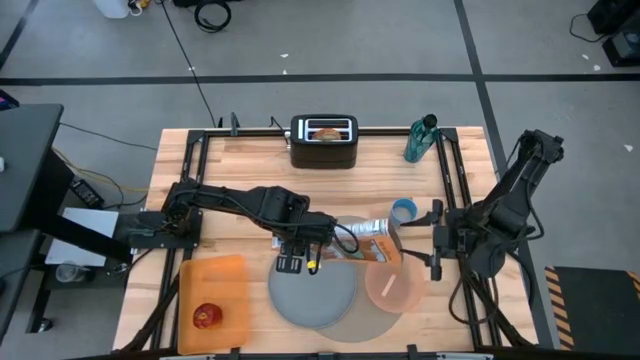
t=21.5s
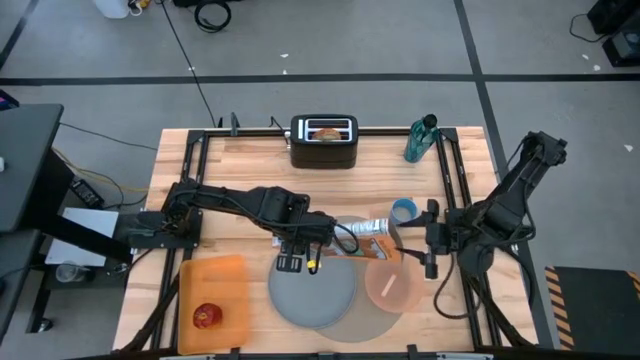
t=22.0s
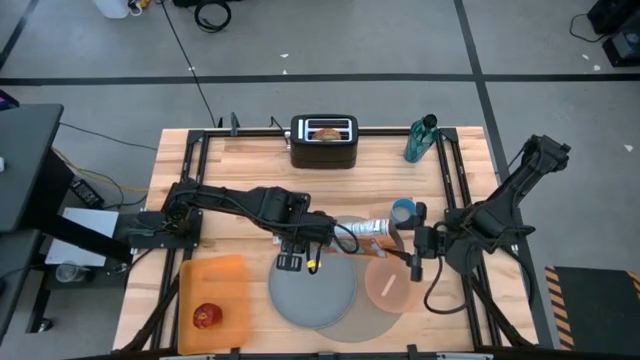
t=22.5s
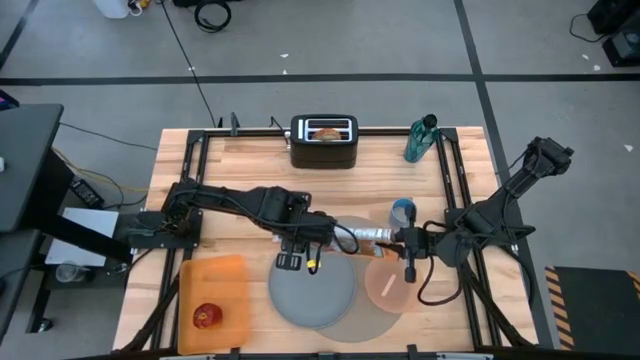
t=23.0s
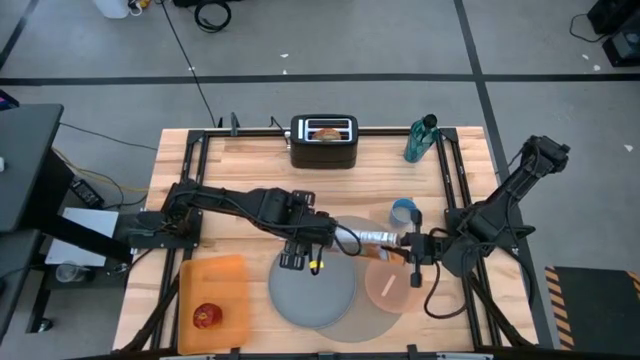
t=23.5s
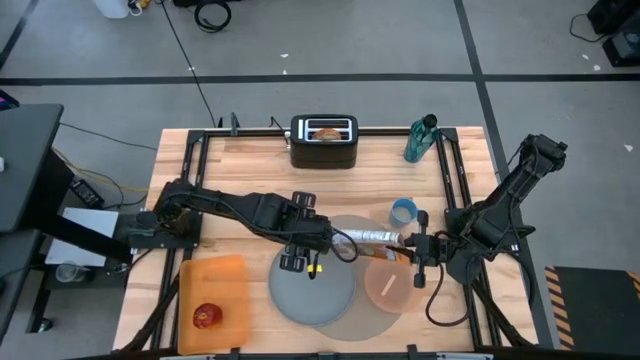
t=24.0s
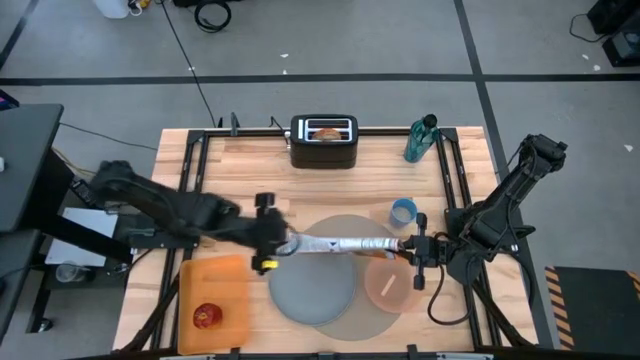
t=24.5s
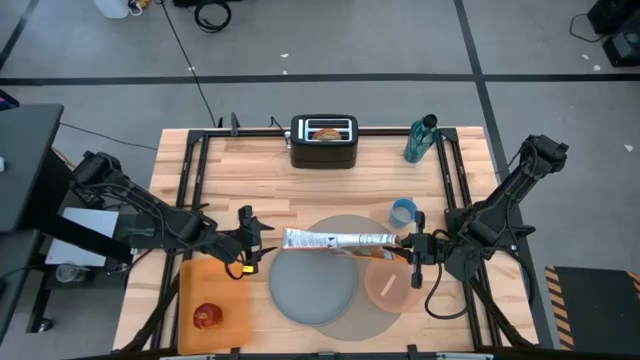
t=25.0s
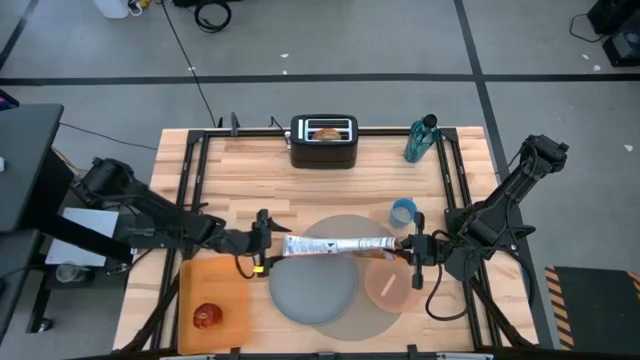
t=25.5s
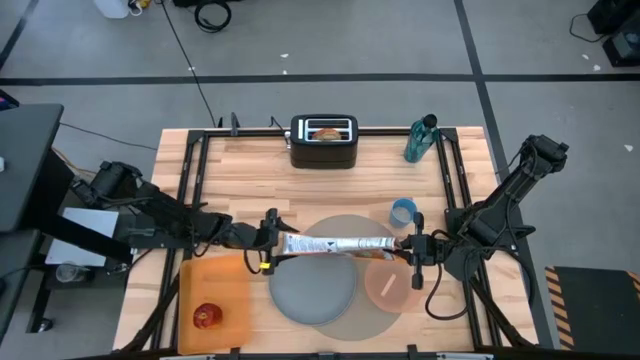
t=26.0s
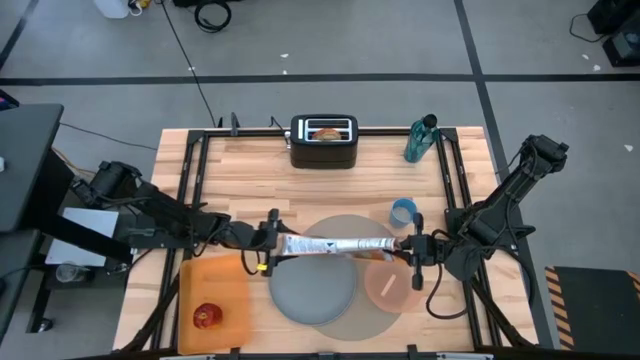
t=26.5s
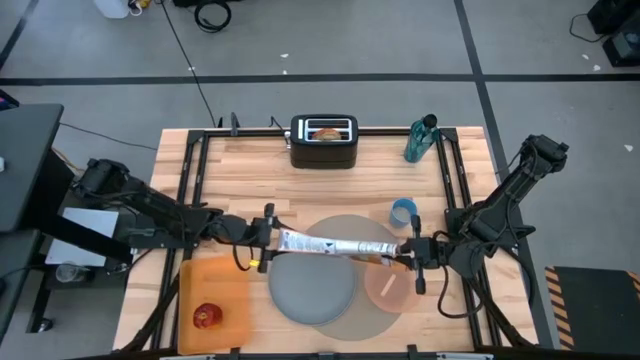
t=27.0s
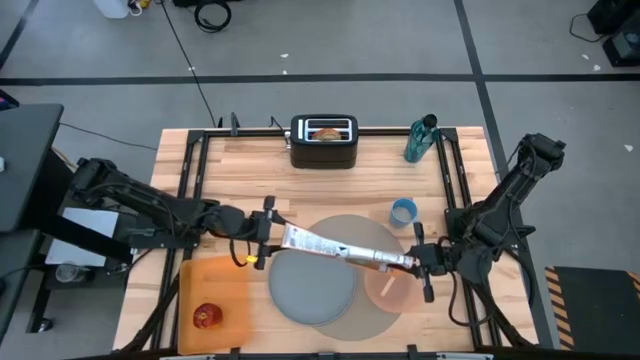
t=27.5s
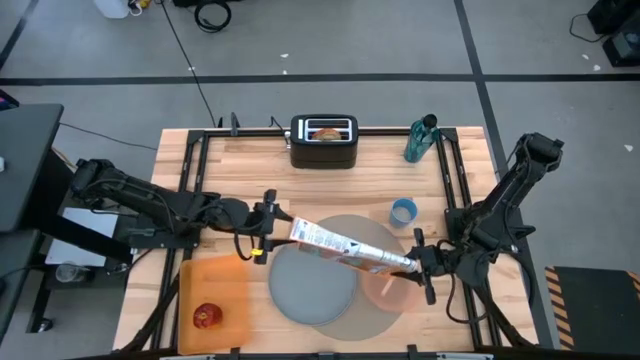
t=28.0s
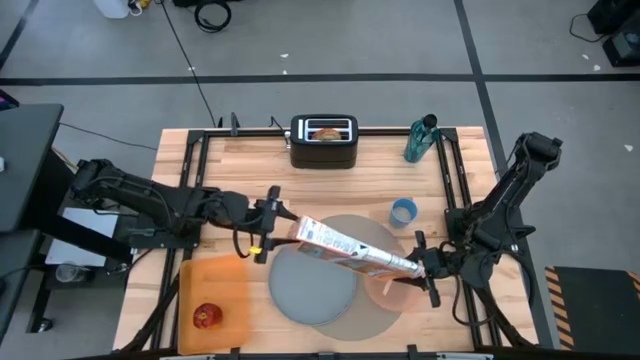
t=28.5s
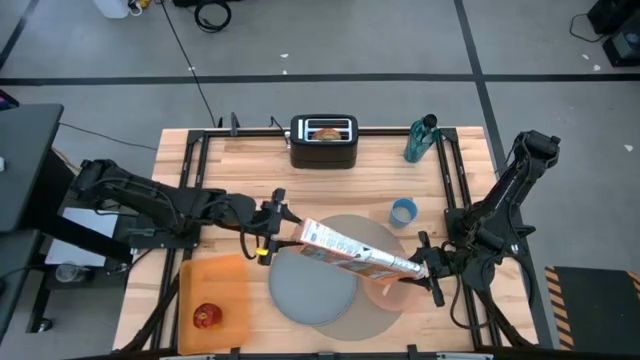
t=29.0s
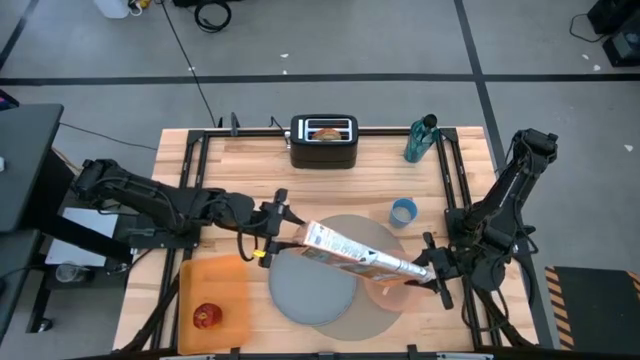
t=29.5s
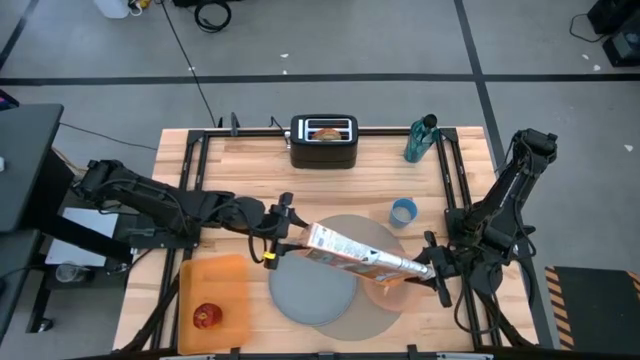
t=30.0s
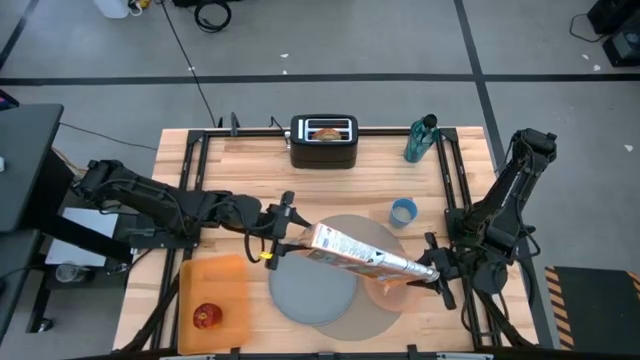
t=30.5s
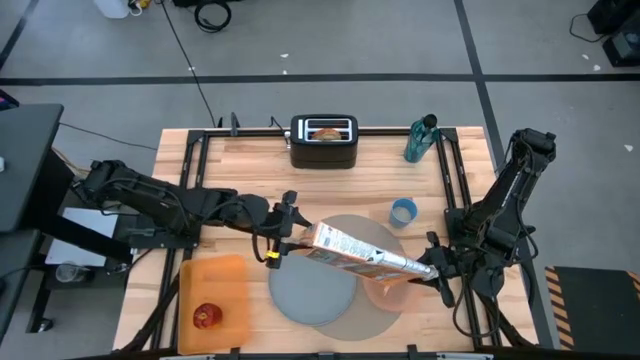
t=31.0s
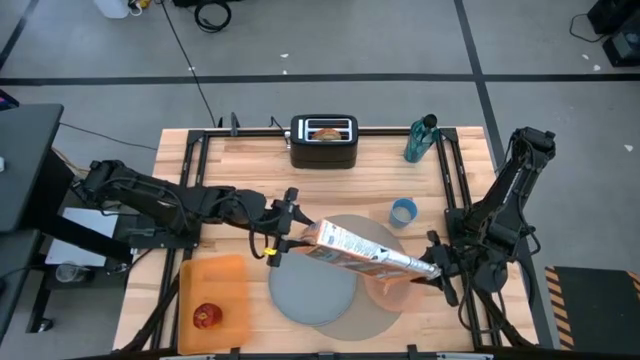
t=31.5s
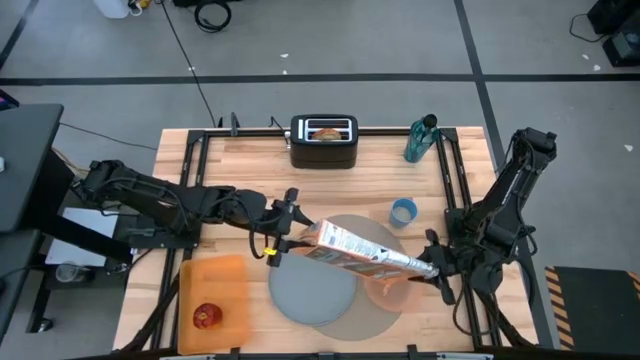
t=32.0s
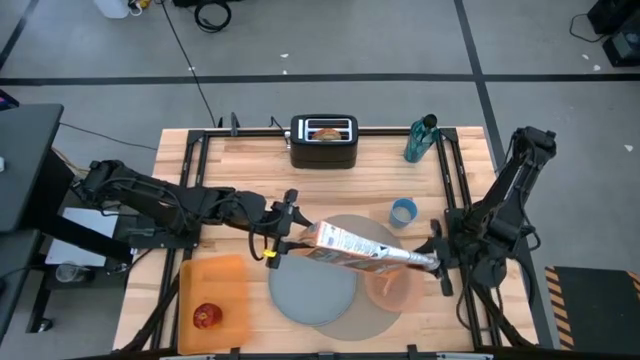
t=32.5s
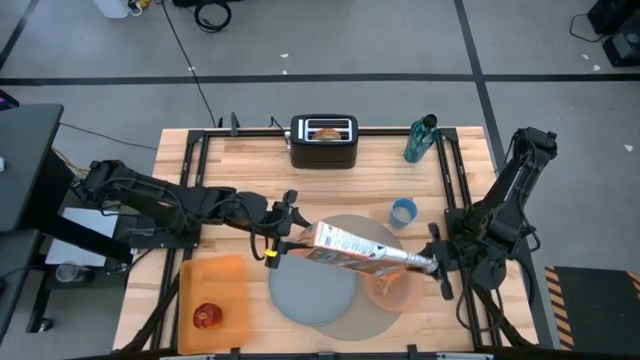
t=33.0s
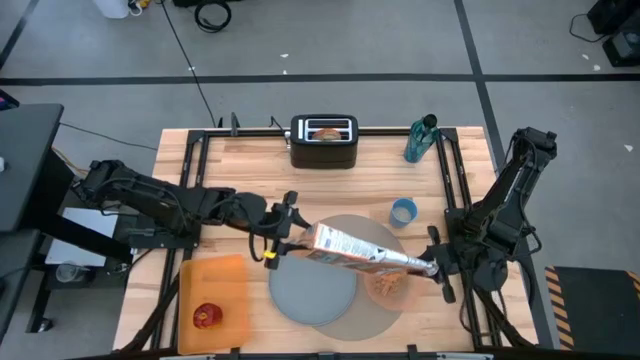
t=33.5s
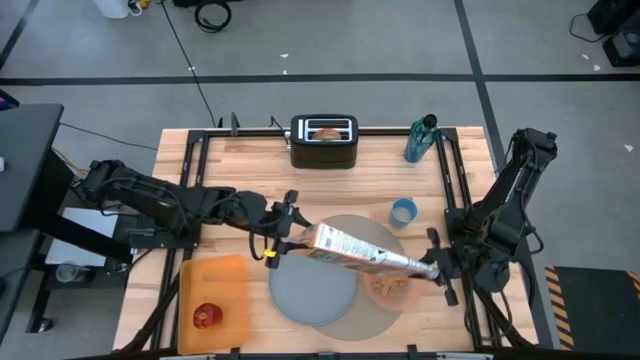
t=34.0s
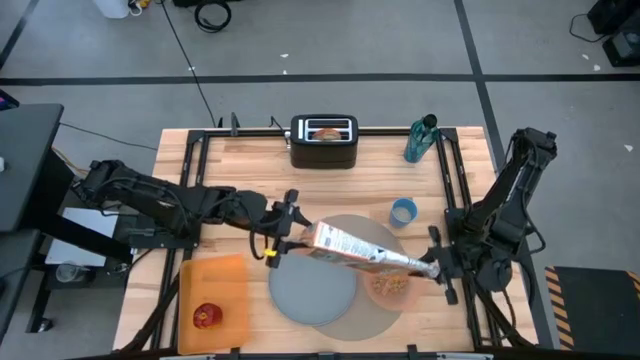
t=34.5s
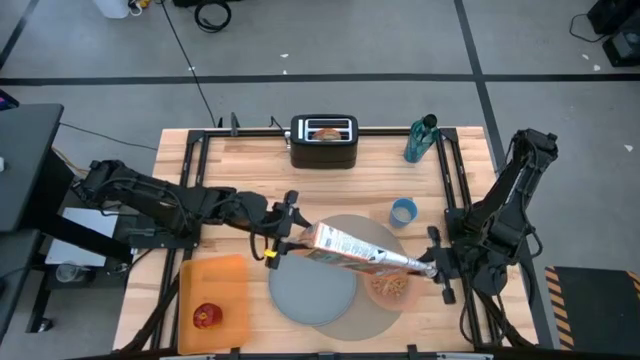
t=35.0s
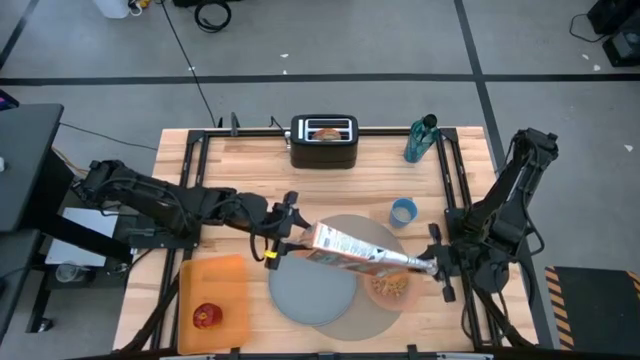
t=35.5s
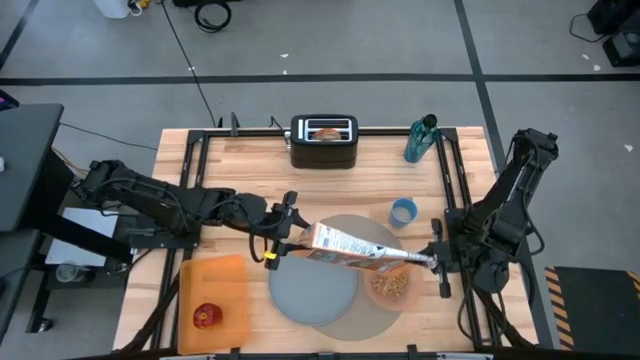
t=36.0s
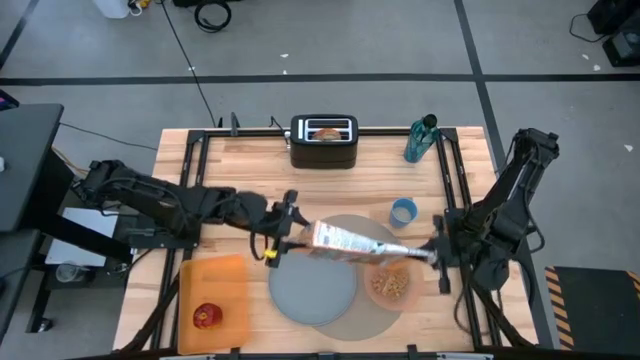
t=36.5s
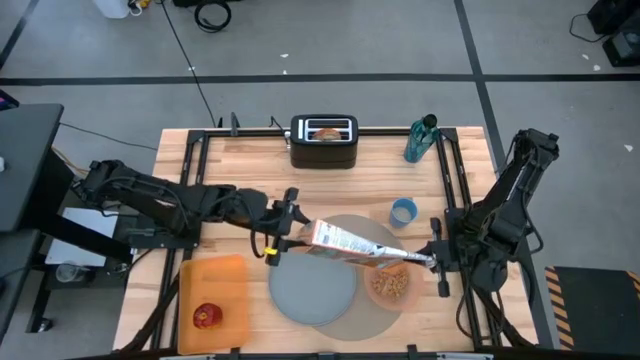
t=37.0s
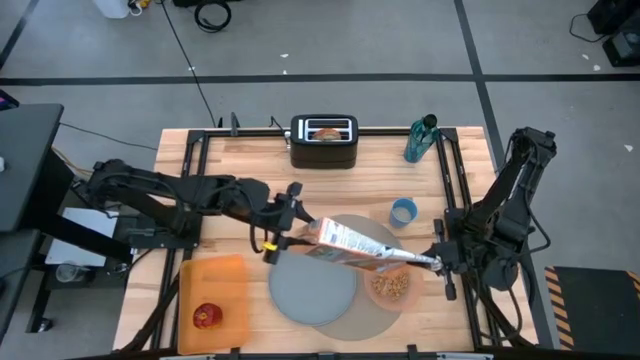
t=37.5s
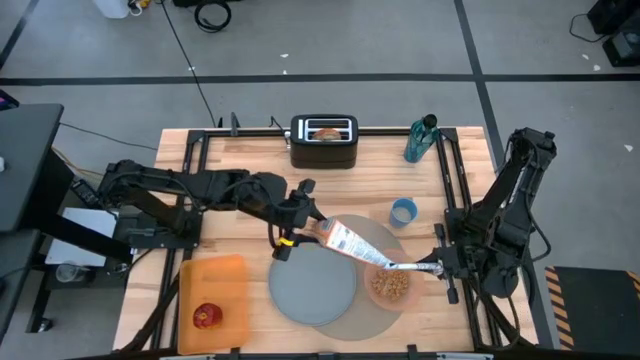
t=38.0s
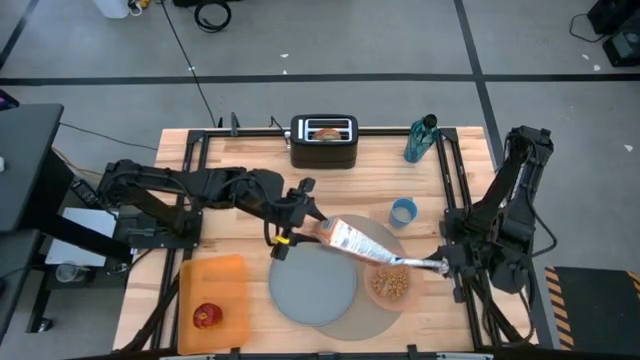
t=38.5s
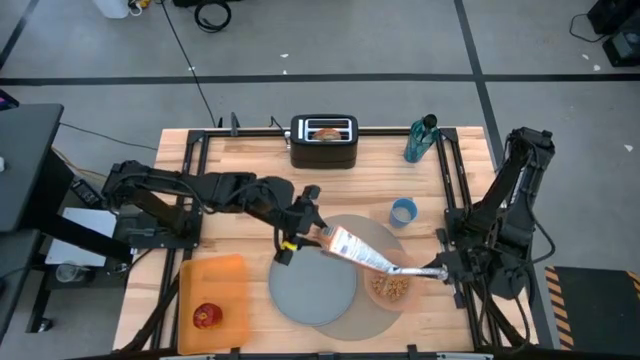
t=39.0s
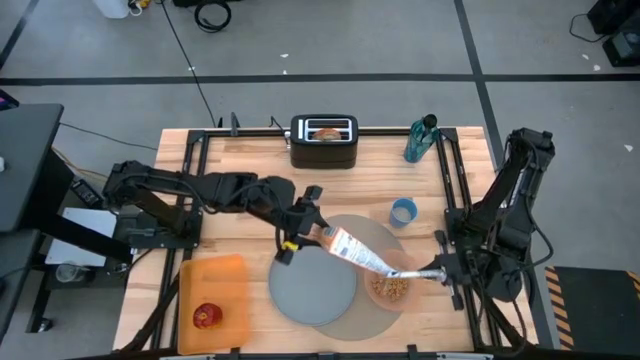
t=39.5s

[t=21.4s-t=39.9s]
Task: Arrange a breakfast setting
Pour cereal into the orange bowl

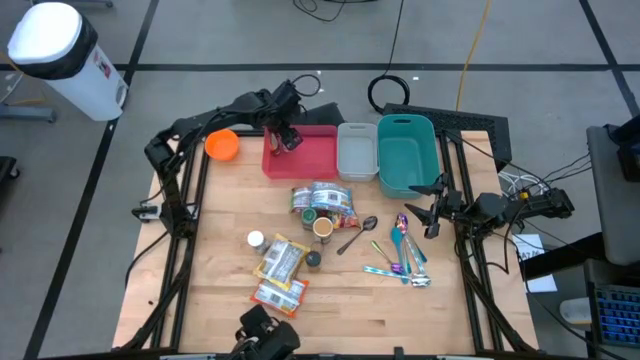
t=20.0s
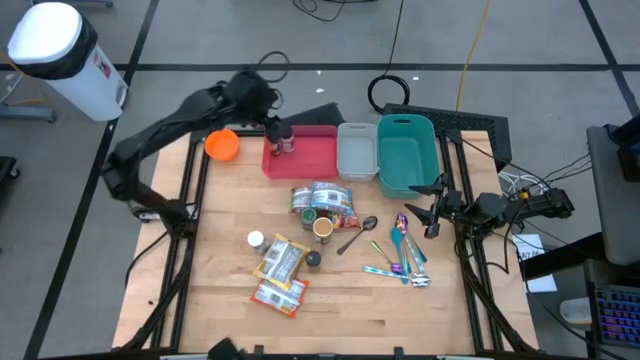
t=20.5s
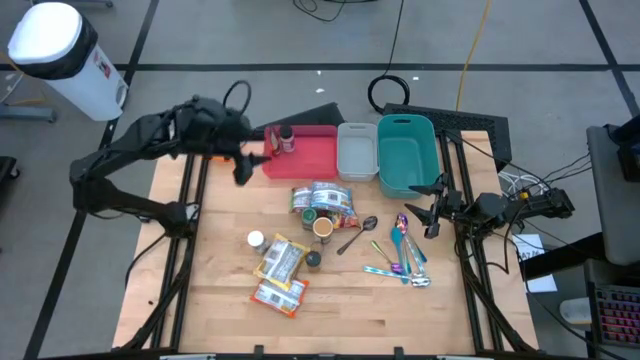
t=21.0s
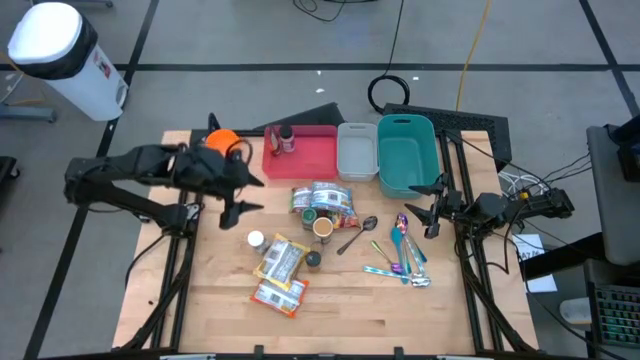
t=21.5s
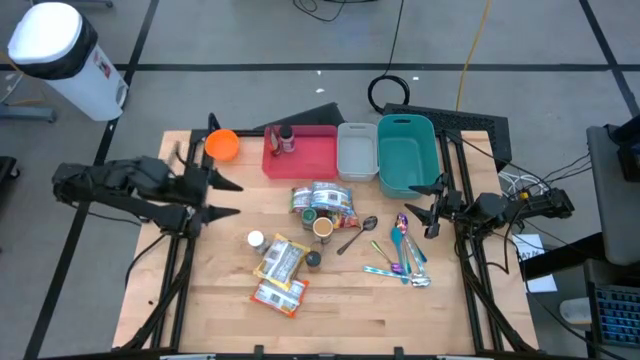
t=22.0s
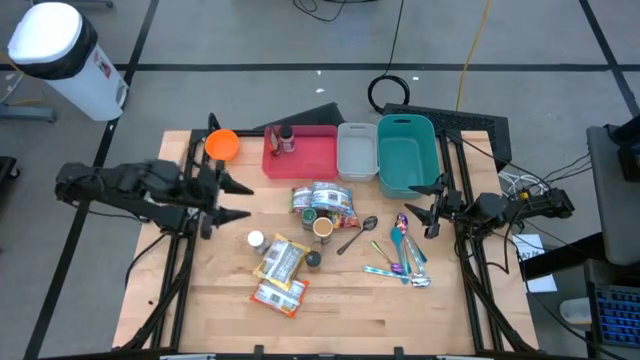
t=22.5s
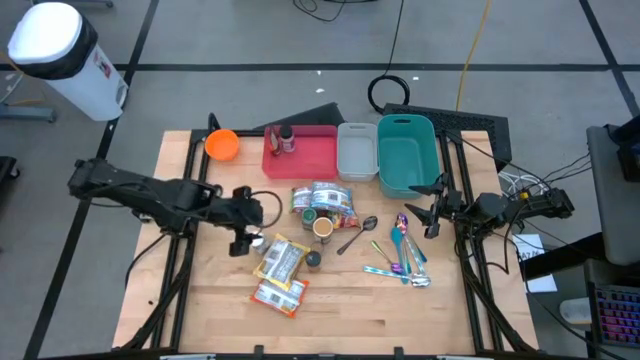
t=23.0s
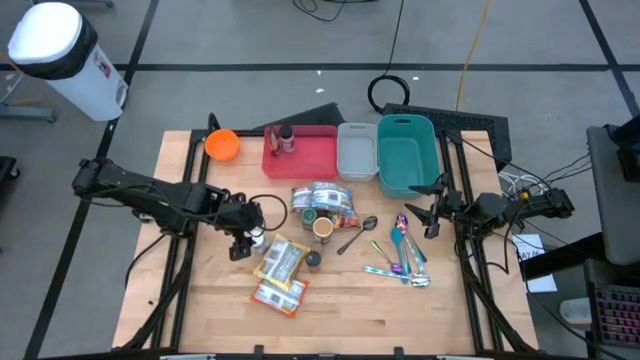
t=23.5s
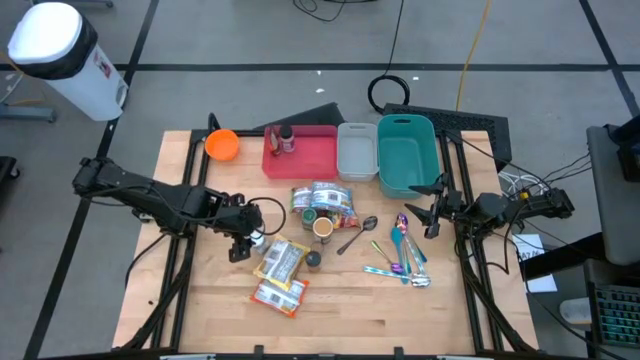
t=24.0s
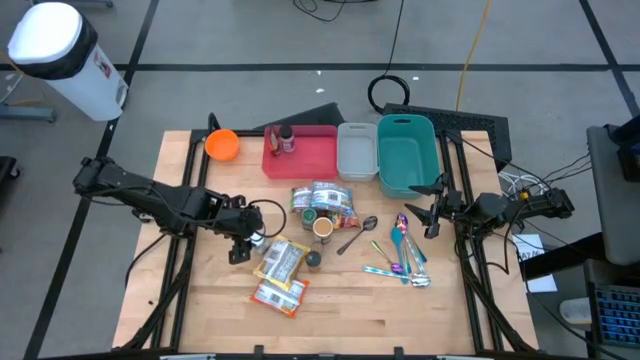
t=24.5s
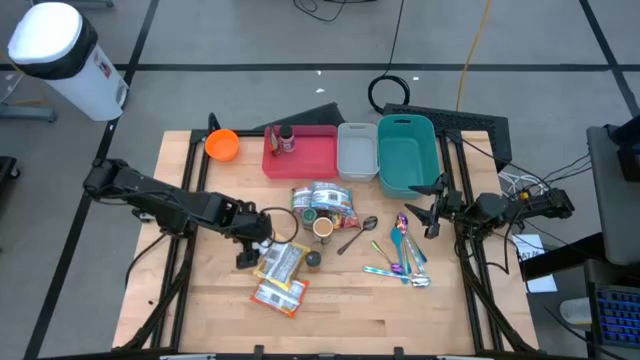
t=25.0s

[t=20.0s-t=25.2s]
Task: Pick & Place Food Item
Put the white seasoning bottle into the red bin
